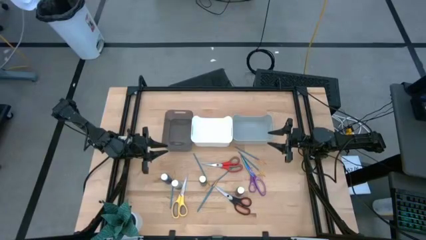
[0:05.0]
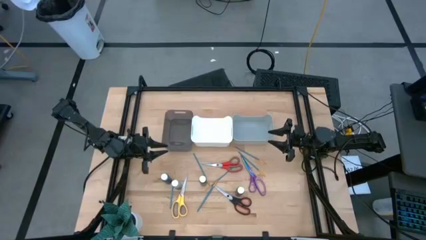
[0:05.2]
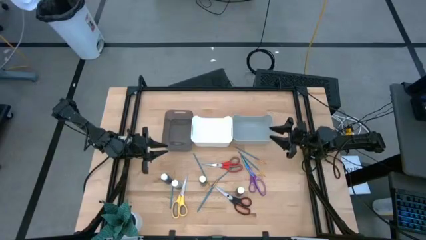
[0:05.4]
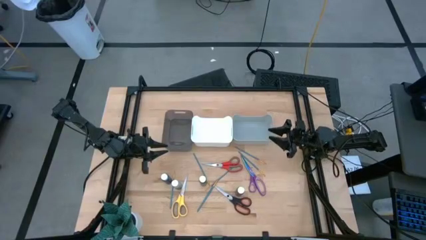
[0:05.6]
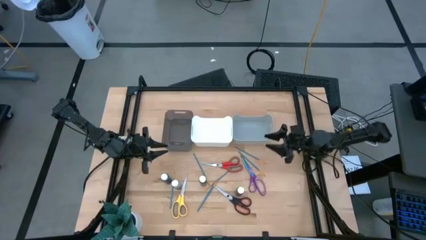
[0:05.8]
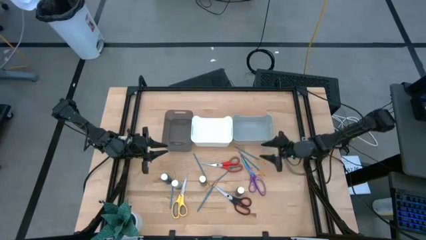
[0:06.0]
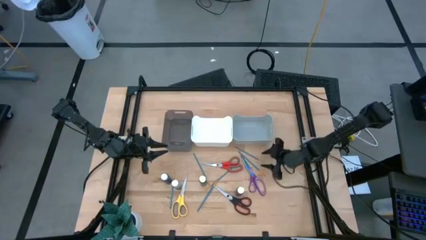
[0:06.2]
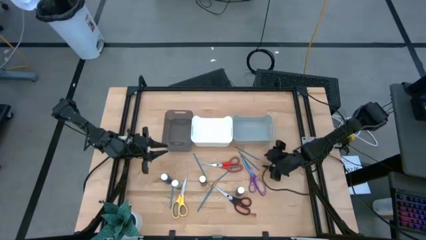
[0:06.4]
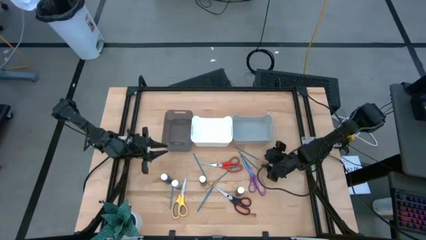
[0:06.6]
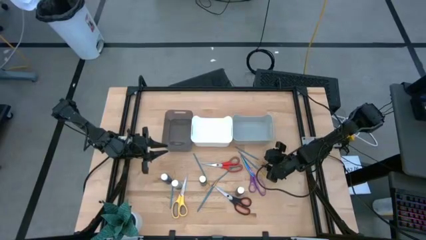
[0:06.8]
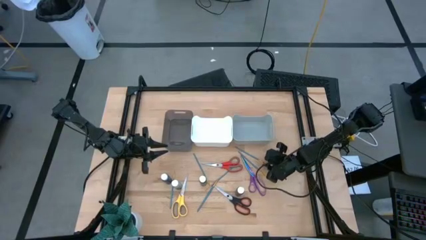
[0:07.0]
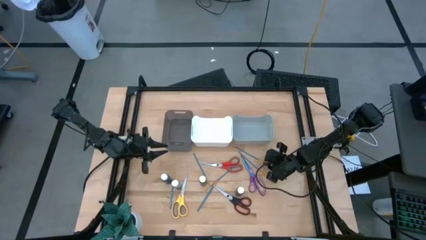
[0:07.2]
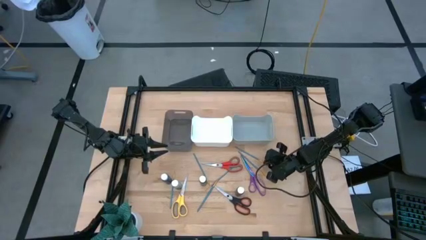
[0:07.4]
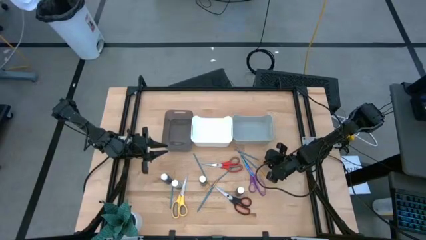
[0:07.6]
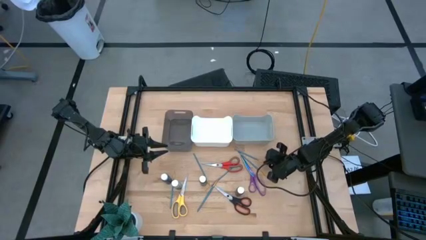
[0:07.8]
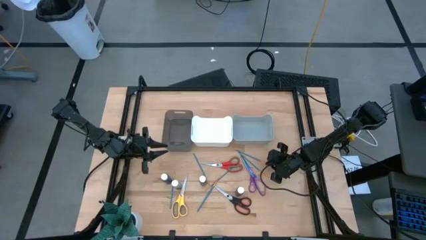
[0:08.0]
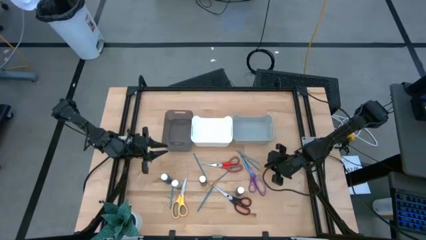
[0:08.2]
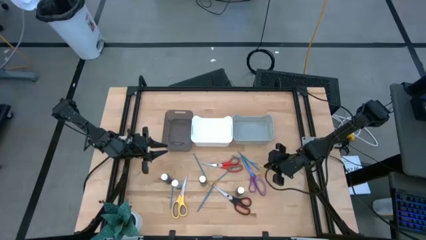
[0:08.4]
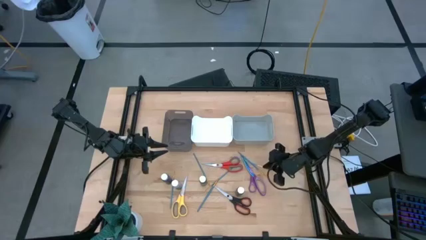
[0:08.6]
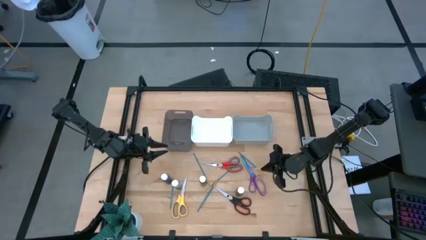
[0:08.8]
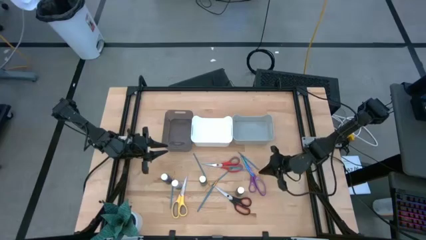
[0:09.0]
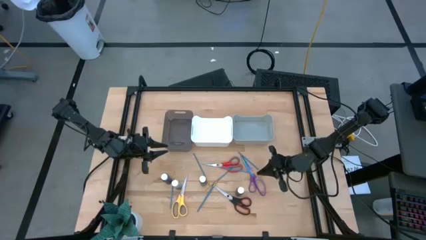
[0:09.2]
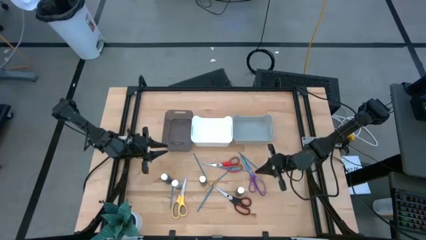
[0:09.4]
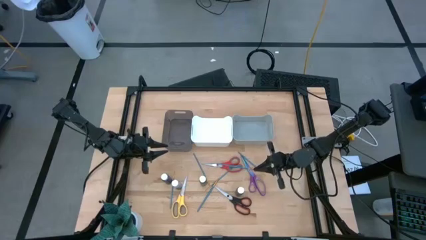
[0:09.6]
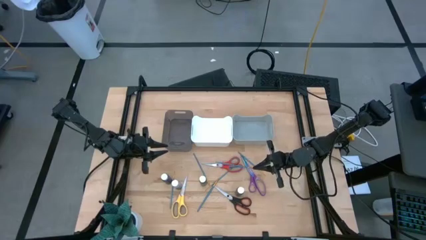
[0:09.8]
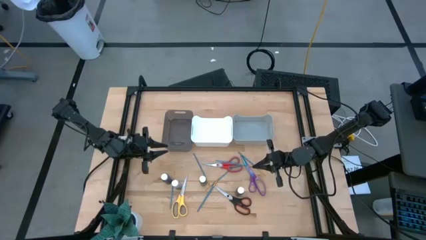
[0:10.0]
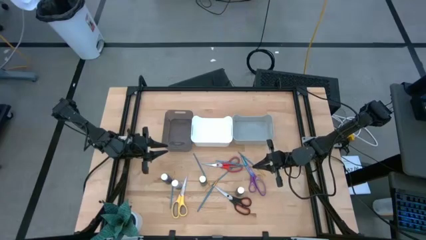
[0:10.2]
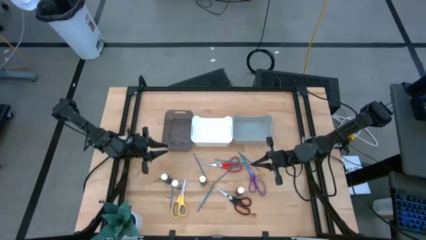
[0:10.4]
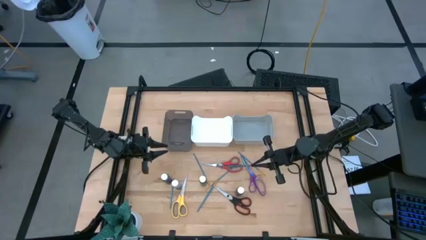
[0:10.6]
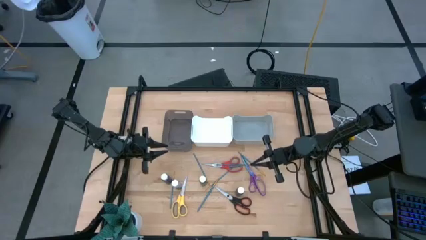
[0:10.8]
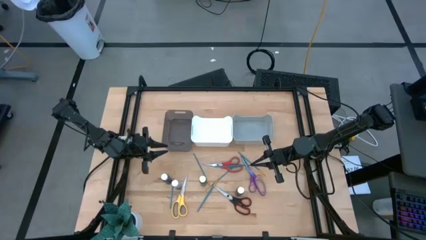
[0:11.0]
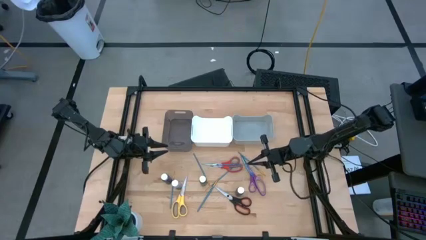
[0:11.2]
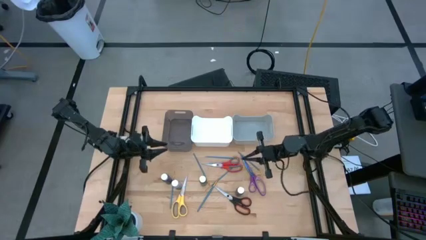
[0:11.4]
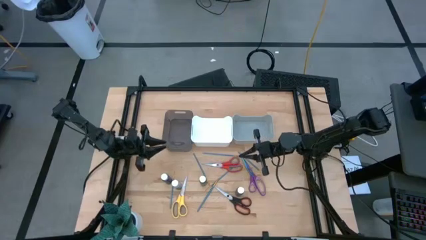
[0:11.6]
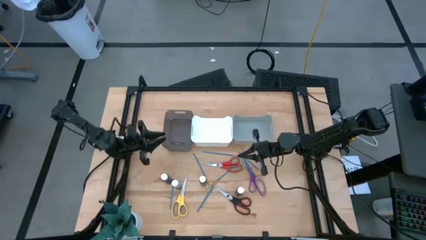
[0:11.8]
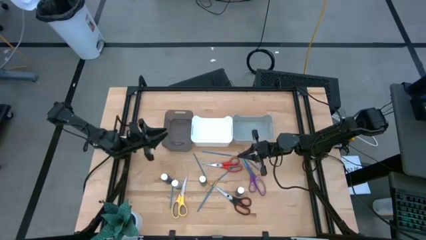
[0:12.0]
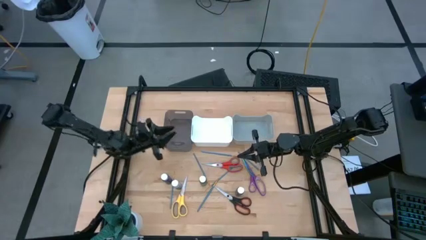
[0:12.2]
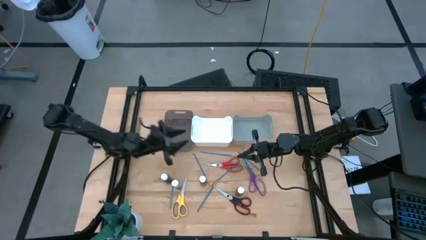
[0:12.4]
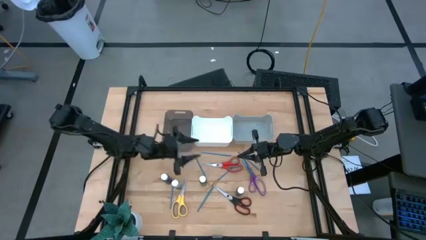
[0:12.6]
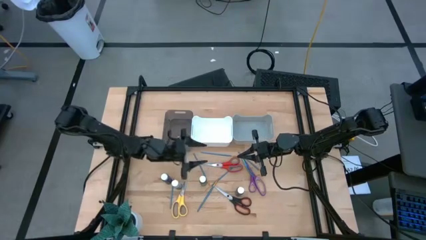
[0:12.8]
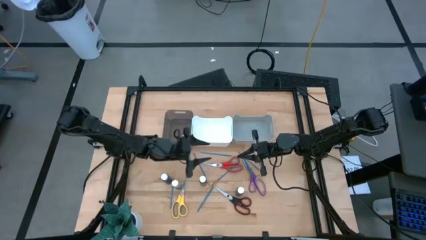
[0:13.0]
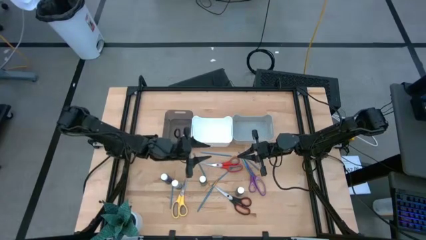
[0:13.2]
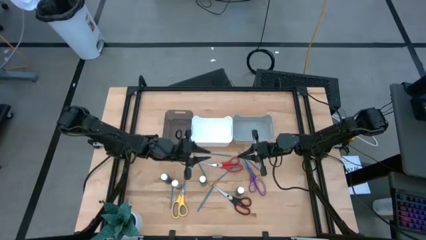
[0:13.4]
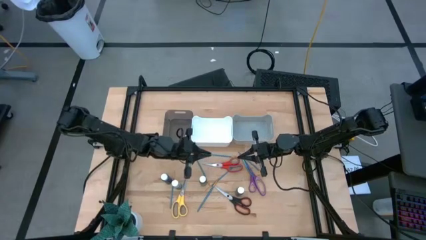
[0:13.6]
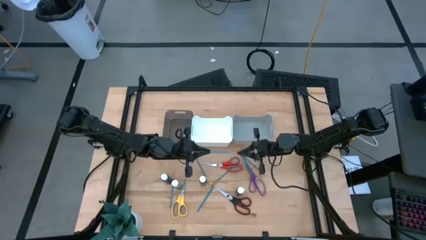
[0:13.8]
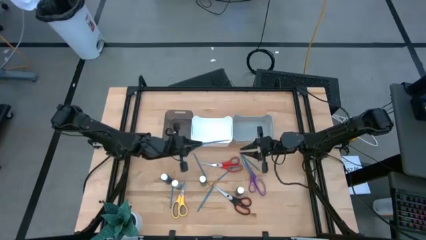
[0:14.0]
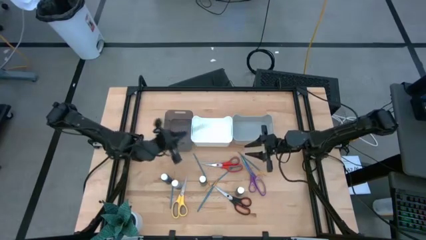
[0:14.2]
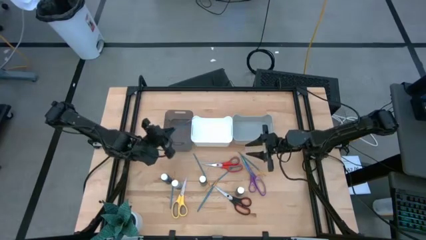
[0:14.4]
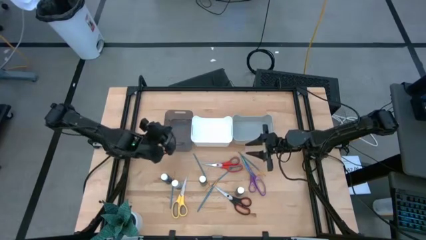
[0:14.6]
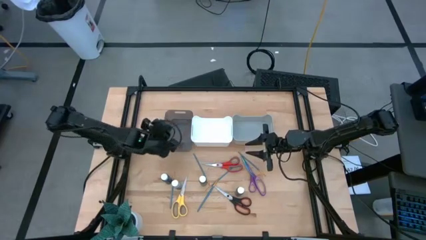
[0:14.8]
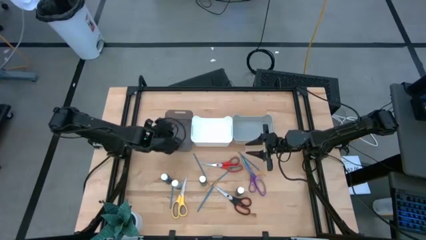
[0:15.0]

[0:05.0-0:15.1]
Task: Pick & Place Paint Supplies
Put the blue paint brush into the black bin
